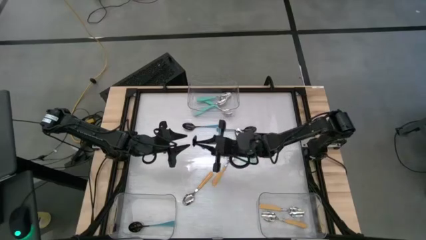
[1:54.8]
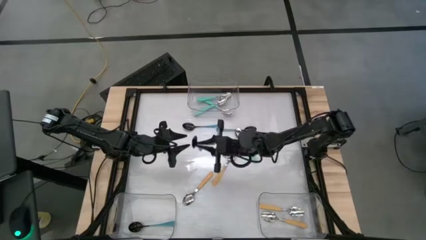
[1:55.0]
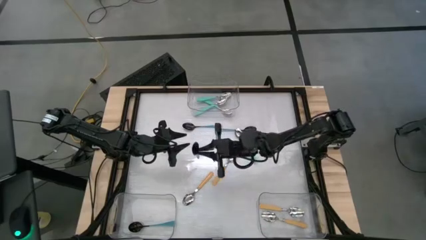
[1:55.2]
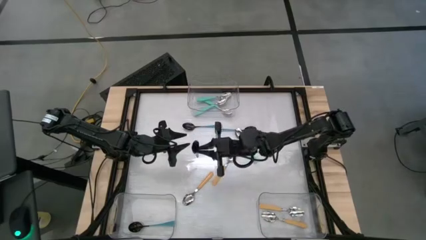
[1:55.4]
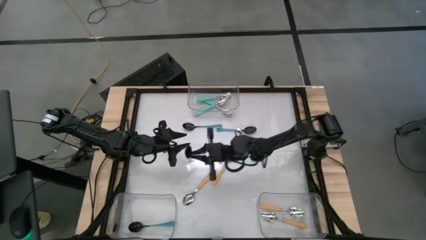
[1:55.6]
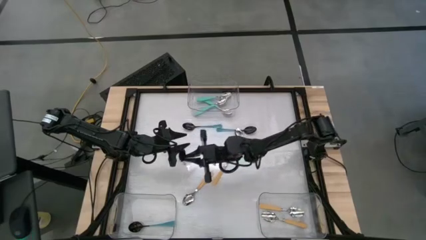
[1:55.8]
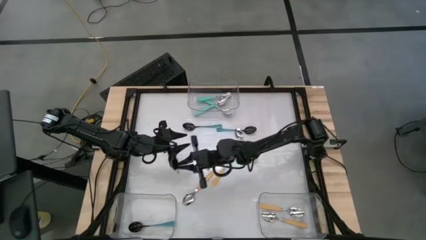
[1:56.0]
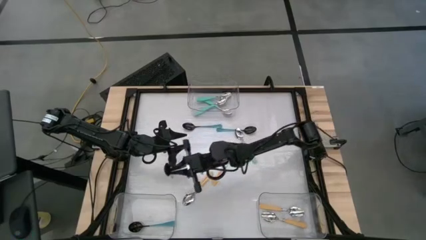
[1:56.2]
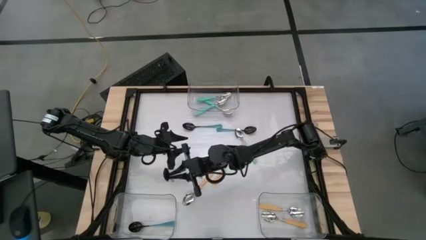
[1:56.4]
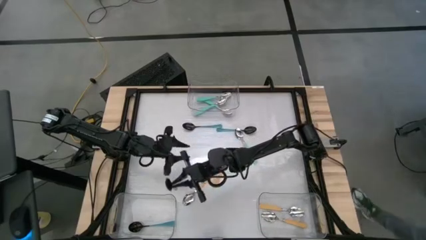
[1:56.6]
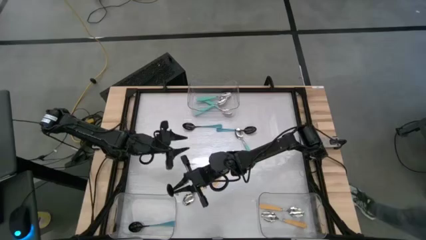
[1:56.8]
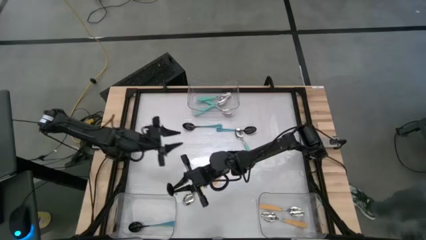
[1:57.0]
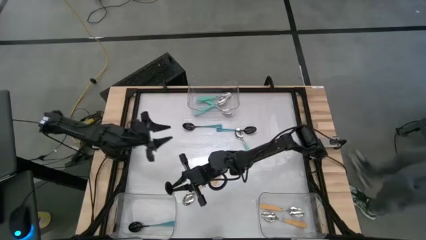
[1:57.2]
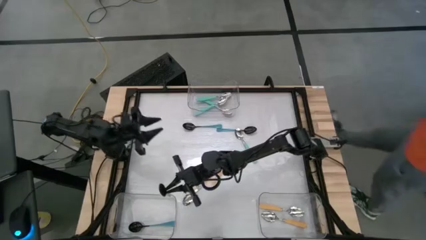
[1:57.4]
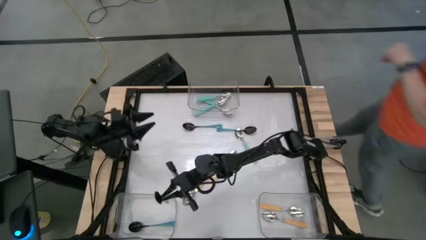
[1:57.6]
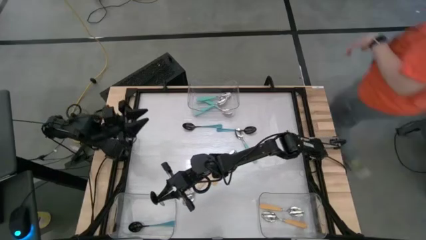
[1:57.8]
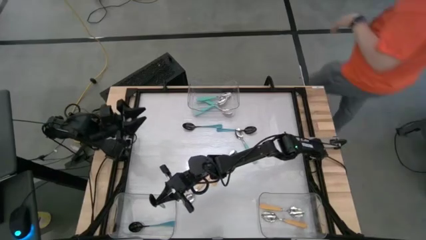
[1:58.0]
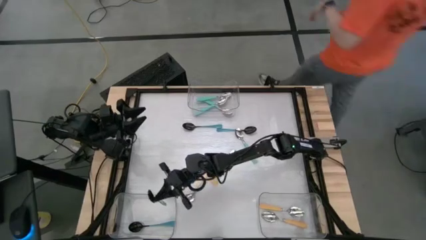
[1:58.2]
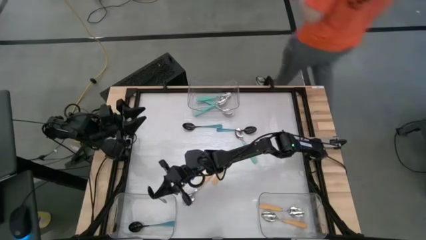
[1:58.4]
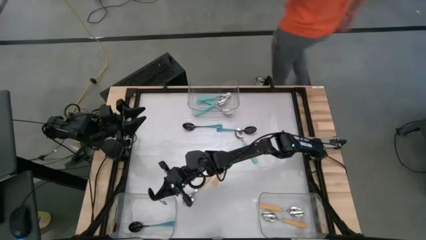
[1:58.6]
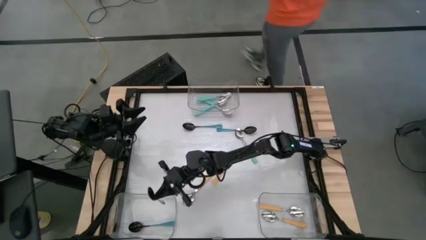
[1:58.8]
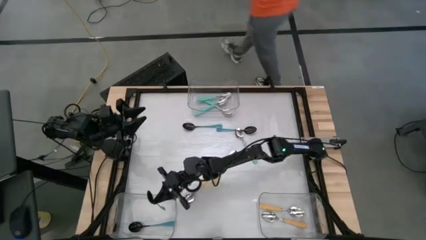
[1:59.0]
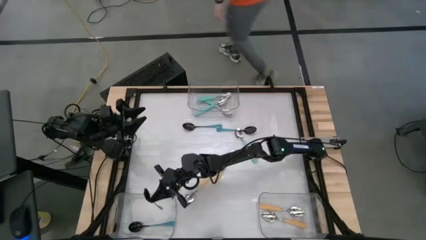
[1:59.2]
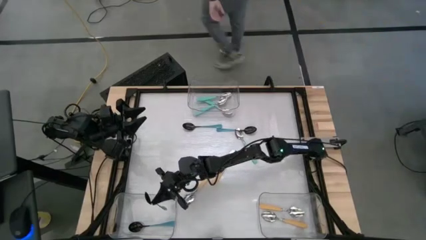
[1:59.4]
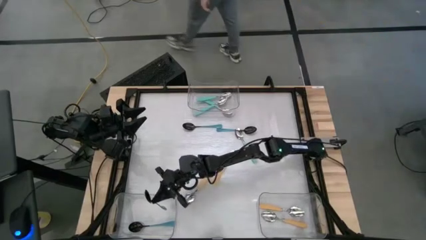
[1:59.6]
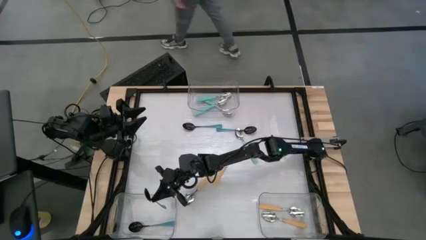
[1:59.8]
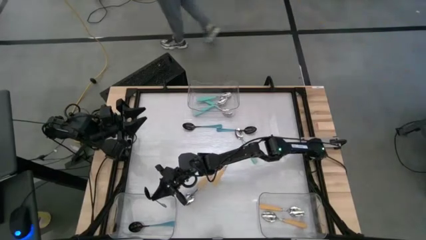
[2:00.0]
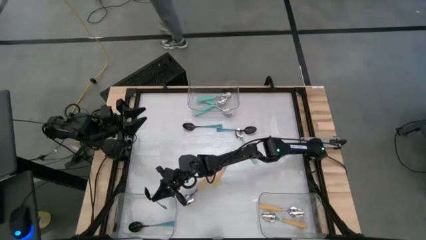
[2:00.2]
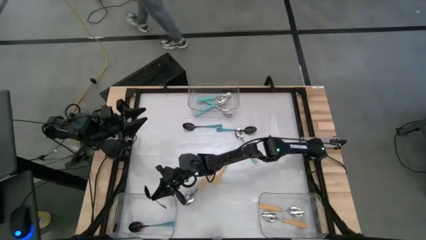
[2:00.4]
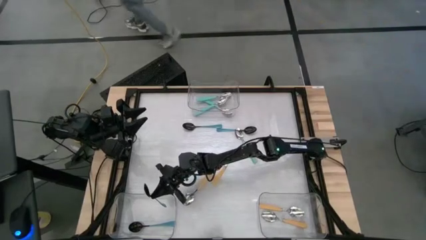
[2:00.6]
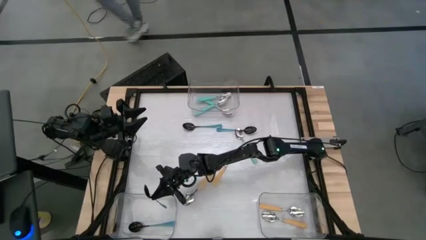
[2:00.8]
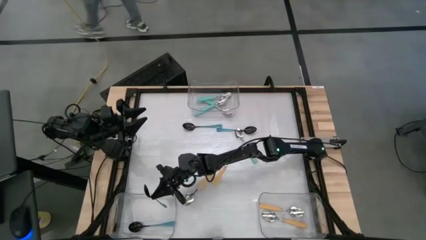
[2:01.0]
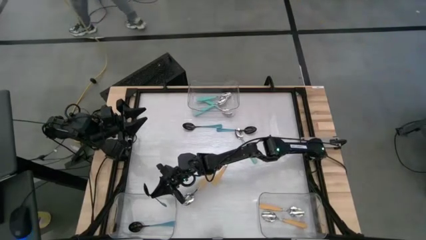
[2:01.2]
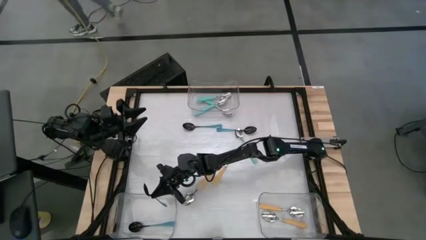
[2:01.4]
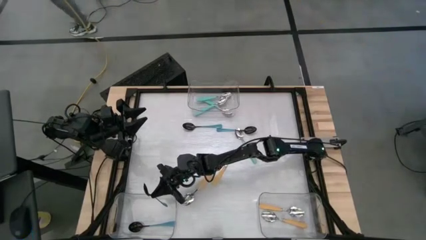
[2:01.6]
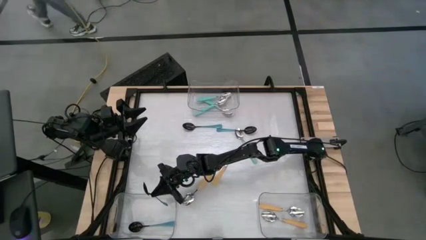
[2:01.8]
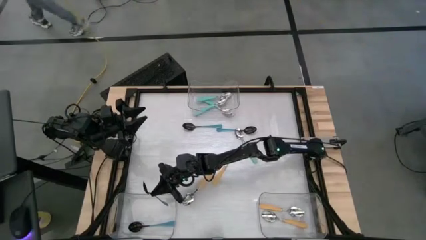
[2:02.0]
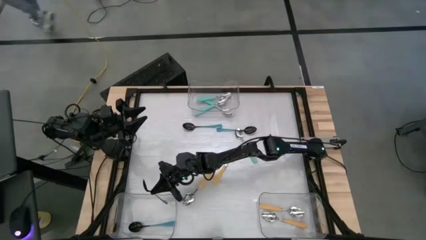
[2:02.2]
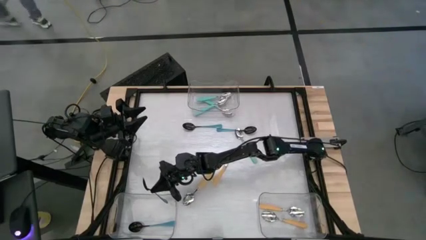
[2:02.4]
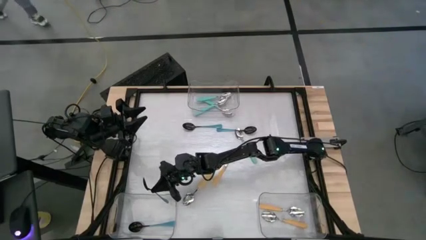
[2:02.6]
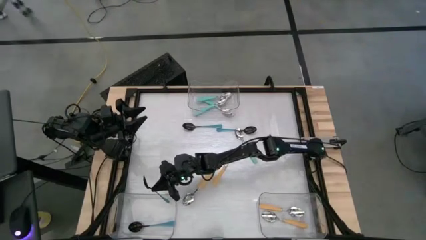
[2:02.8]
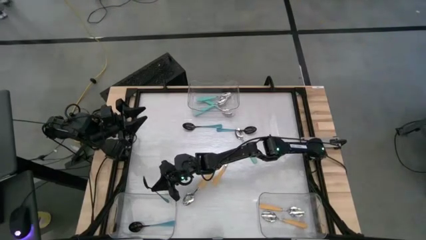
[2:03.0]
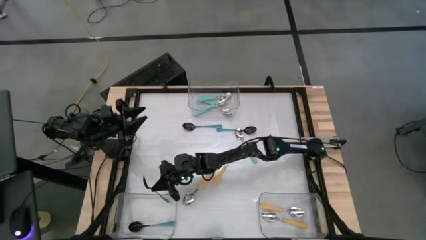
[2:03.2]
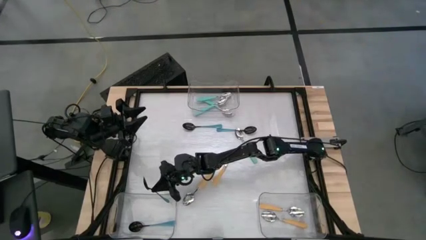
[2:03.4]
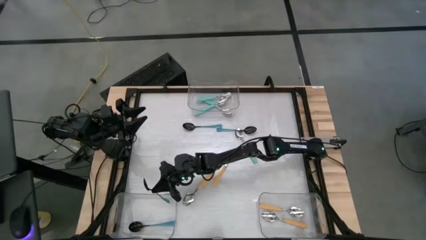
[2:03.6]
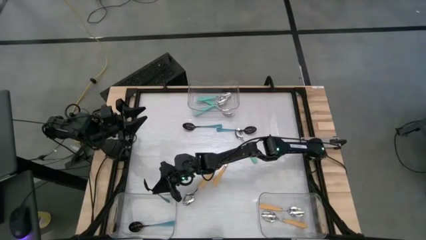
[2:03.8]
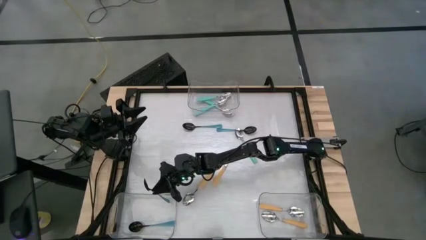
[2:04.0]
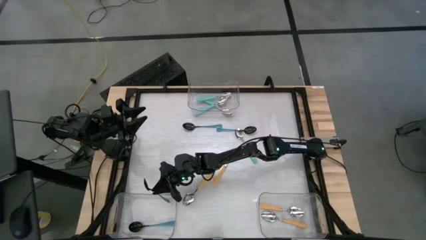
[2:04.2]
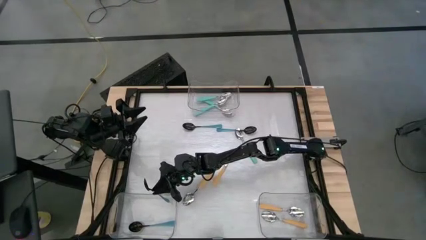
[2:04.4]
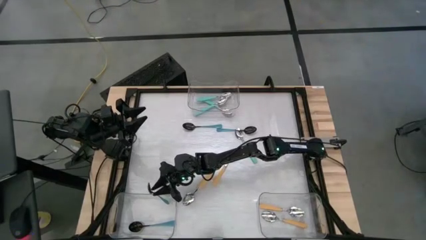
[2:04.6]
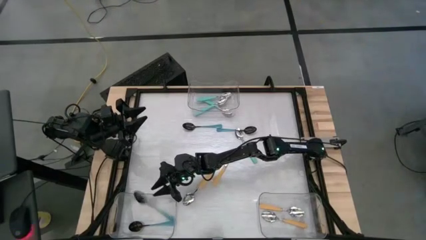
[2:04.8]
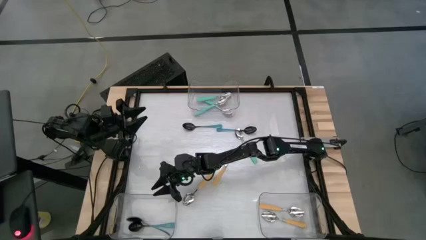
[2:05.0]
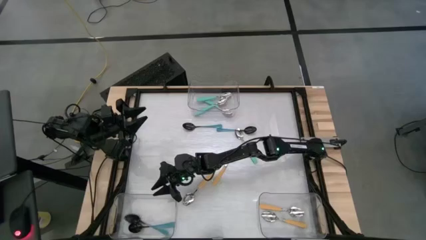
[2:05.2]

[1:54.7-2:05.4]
Task: Sort silverware by color (type)
Put the bottom black spoon into the bottom left transparent bin

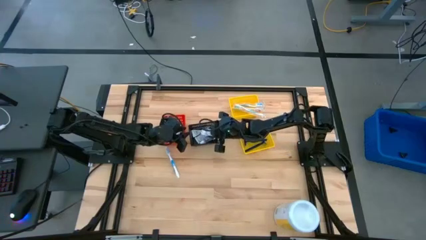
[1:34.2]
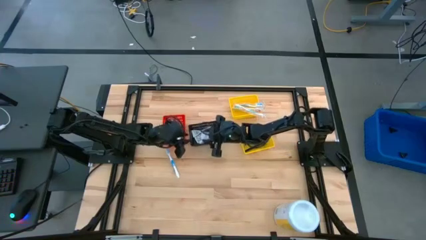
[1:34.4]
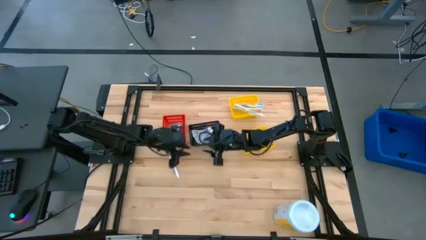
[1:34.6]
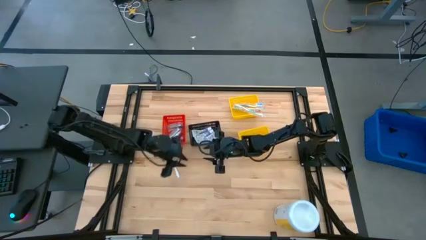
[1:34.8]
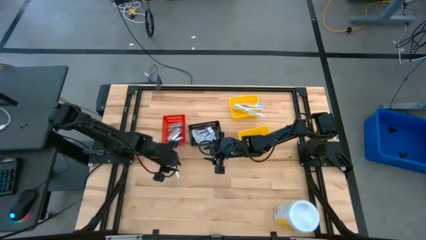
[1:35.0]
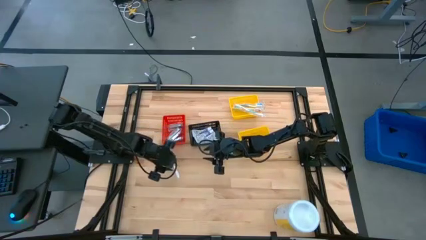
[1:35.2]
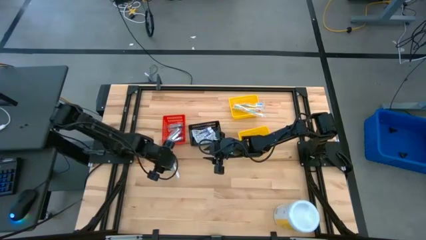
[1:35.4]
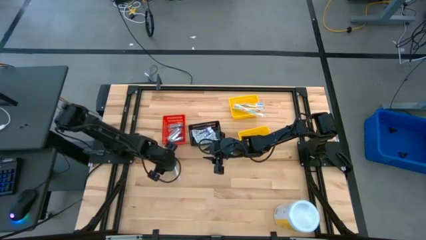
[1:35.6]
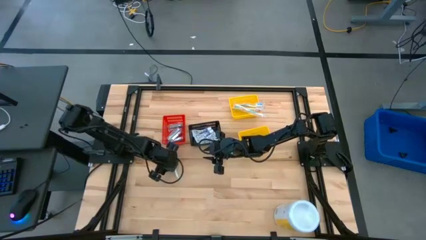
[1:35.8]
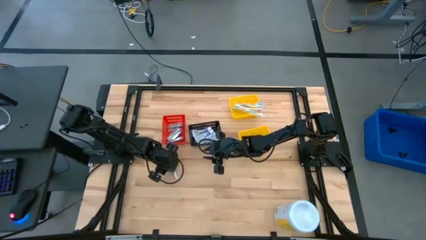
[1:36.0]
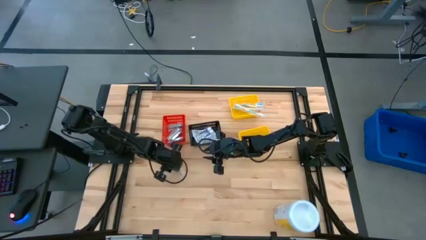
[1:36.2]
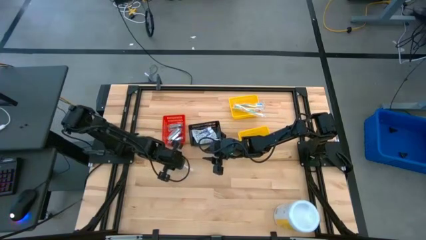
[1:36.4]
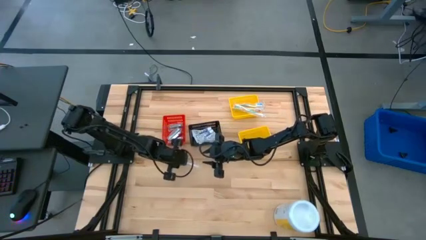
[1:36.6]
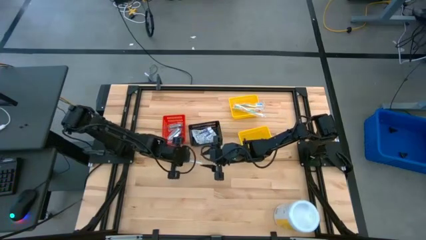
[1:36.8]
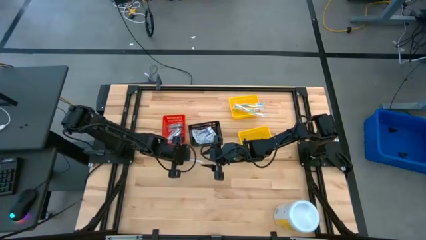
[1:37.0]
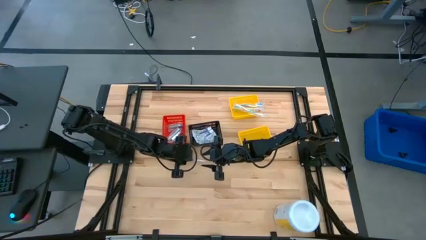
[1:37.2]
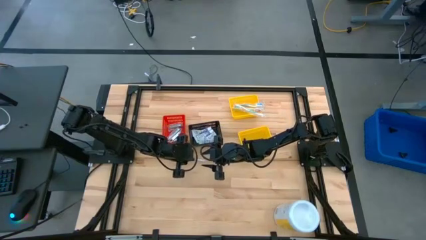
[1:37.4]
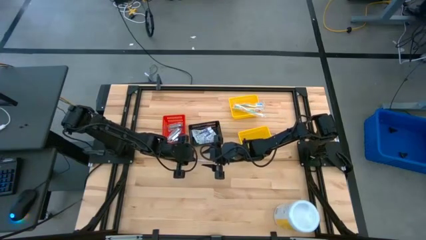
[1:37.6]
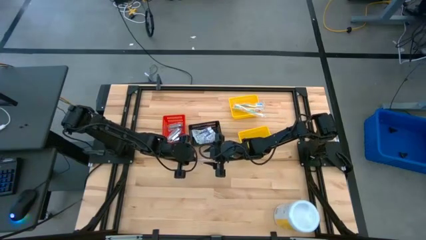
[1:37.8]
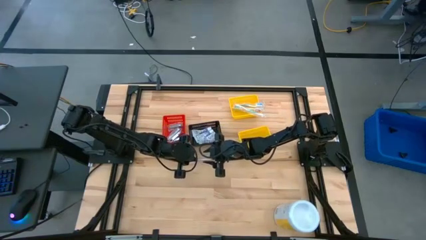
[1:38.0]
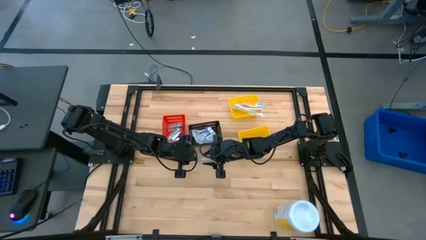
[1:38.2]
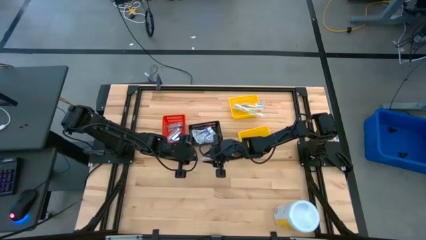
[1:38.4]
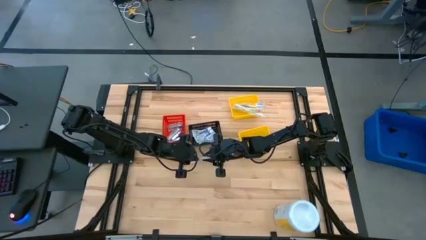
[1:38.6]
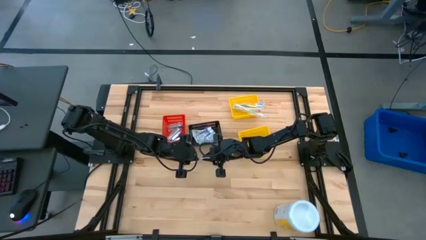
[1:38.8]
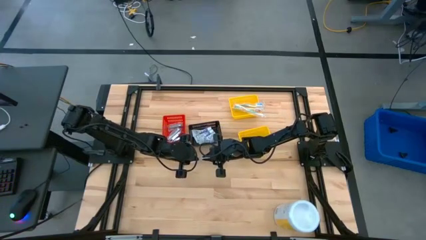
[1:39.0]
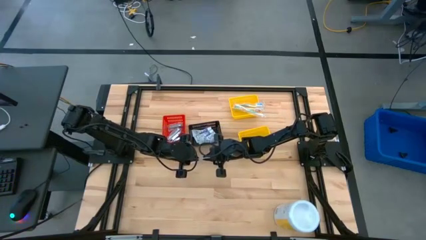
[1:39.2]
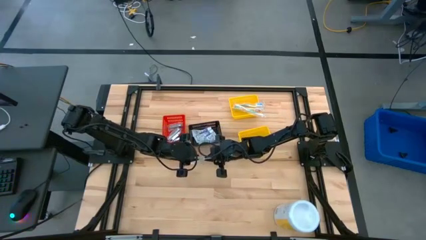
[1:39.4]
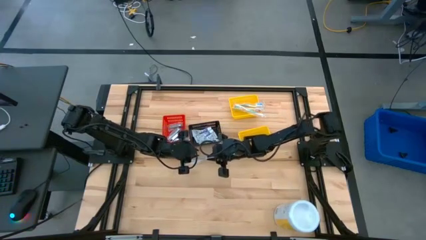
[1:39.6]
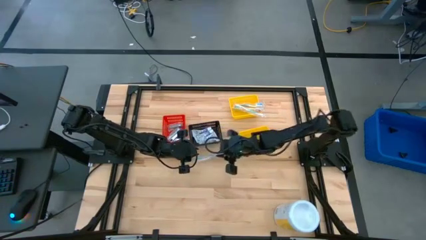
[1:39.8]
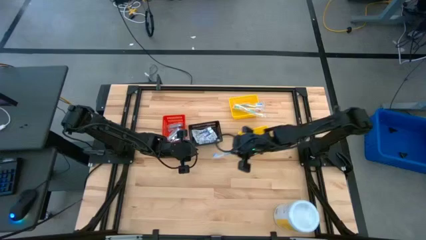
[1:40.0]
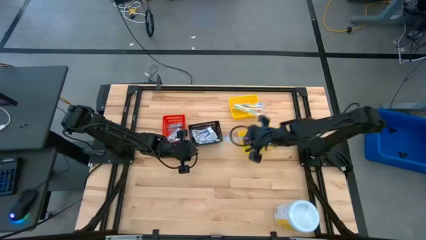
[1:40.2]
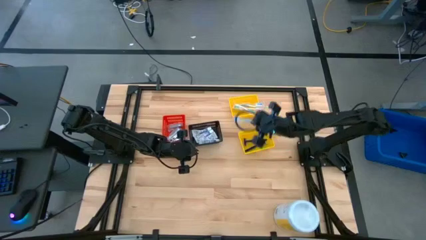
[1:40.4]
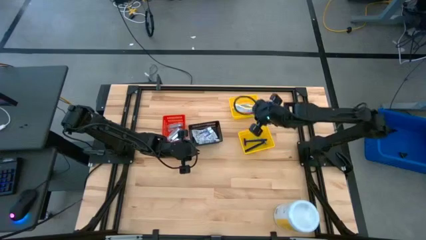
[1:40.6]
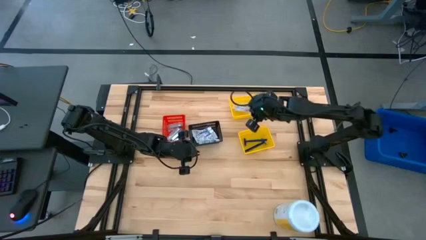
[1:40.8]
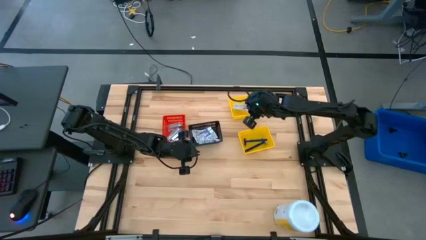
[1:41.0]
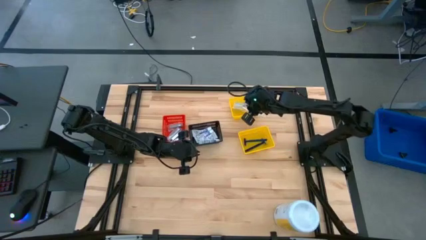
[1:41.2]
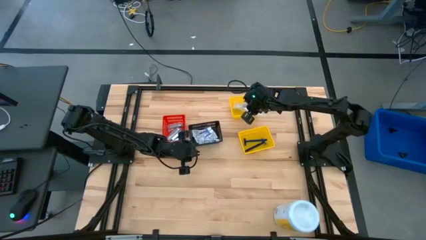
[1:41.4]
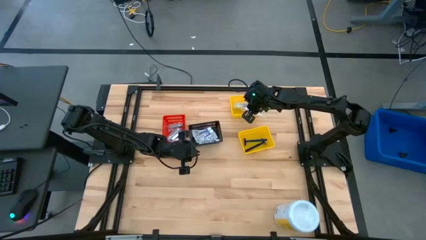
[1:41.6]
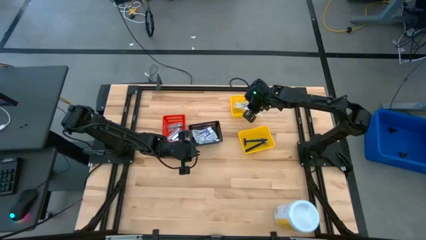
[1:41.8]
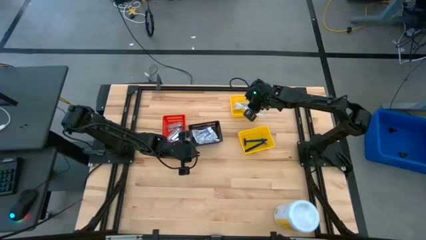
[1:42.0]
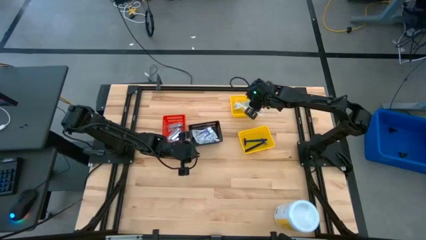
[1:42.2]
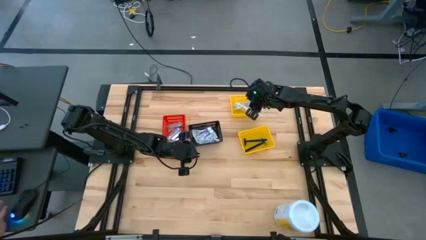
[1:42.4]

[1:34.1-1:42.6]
Task: Pick & Place Travel size toiletries
Put the blue toothbrush into the top yellow bin
